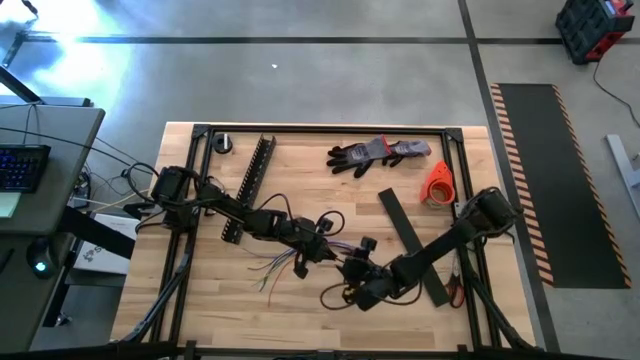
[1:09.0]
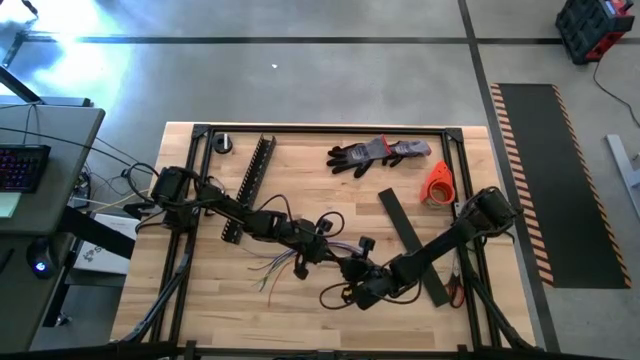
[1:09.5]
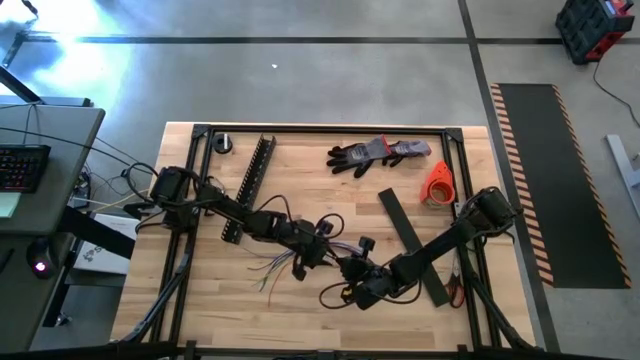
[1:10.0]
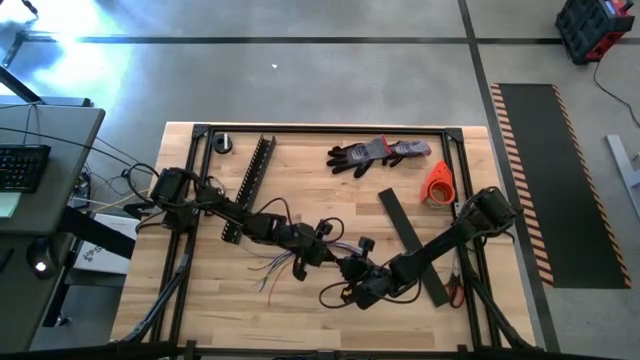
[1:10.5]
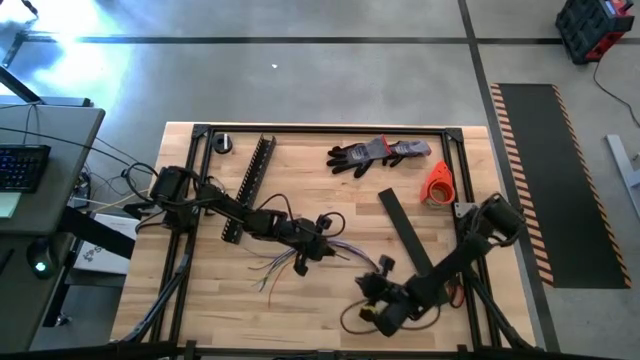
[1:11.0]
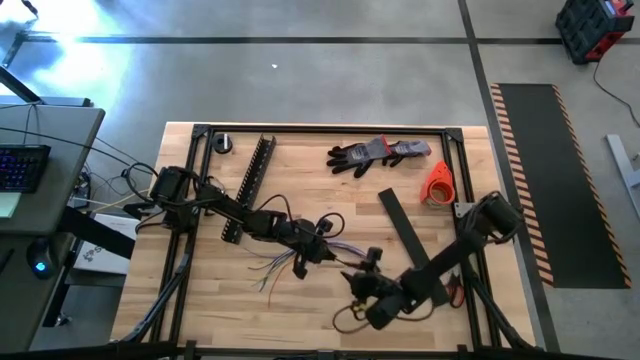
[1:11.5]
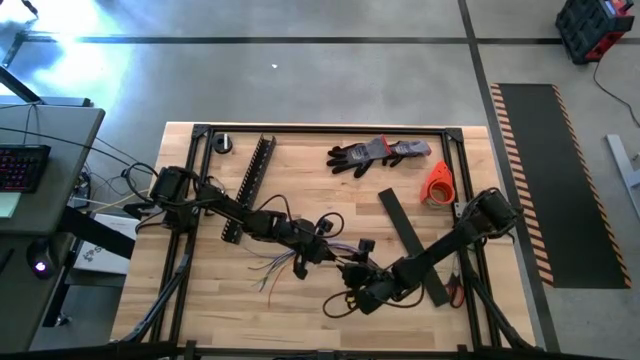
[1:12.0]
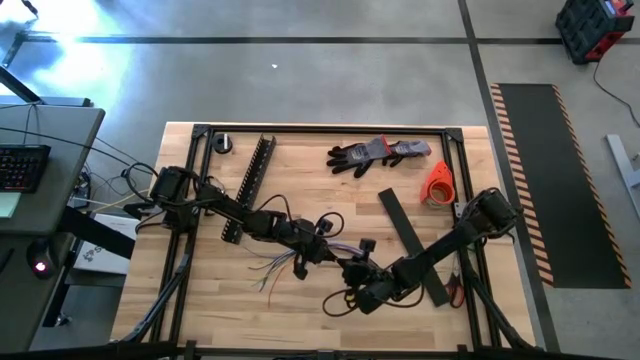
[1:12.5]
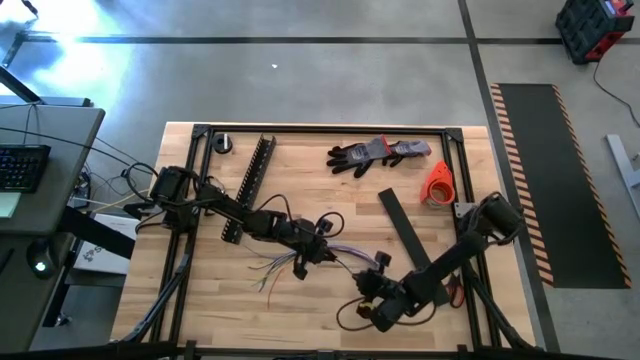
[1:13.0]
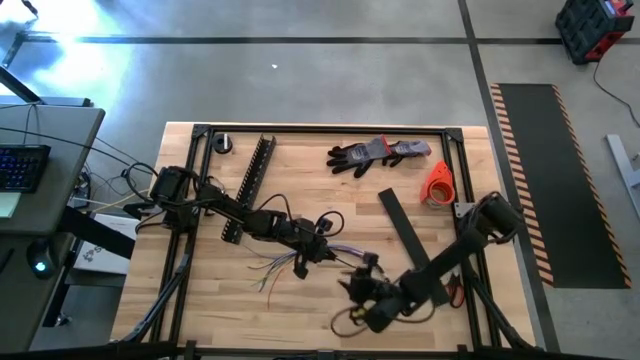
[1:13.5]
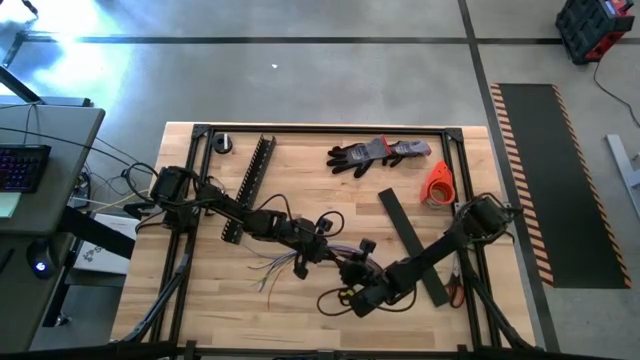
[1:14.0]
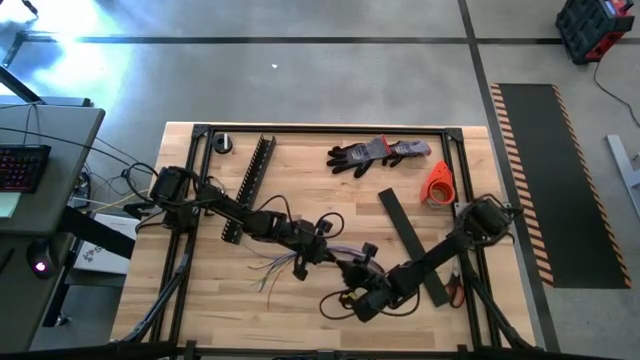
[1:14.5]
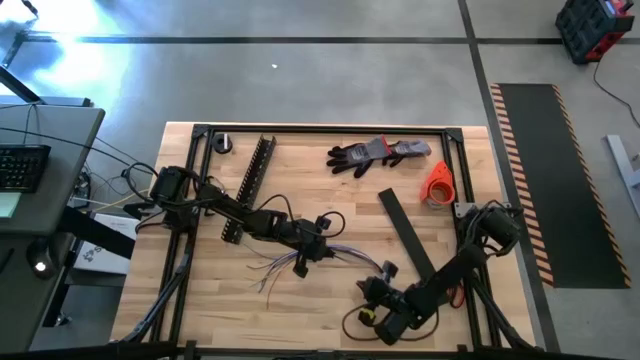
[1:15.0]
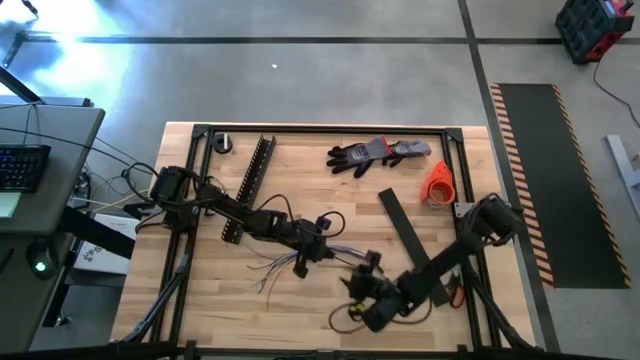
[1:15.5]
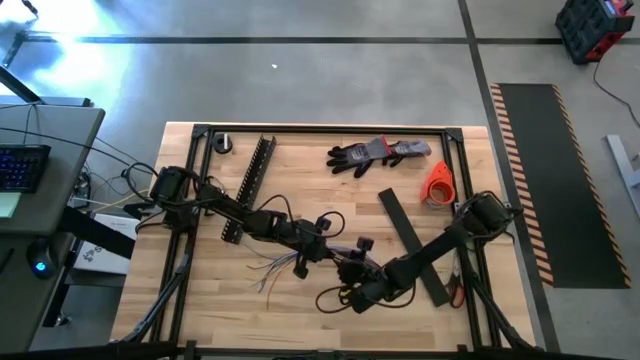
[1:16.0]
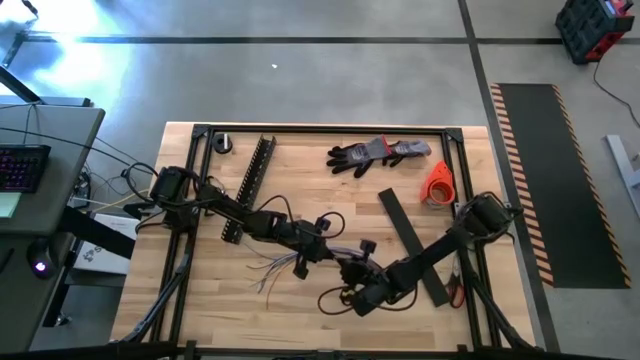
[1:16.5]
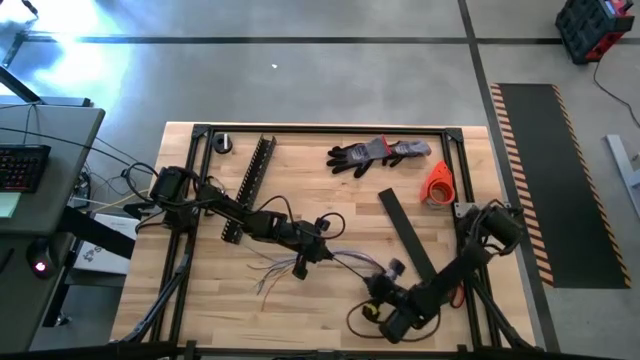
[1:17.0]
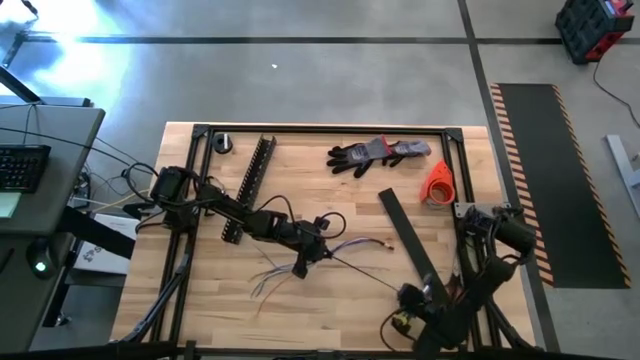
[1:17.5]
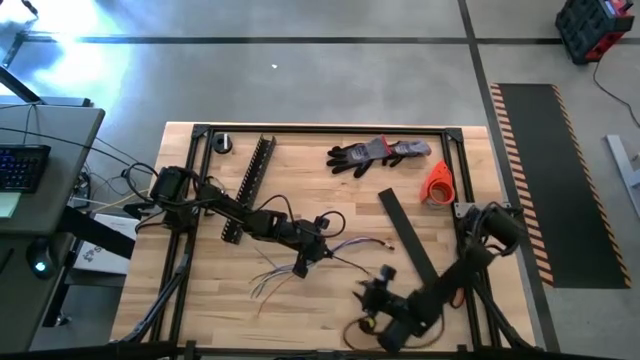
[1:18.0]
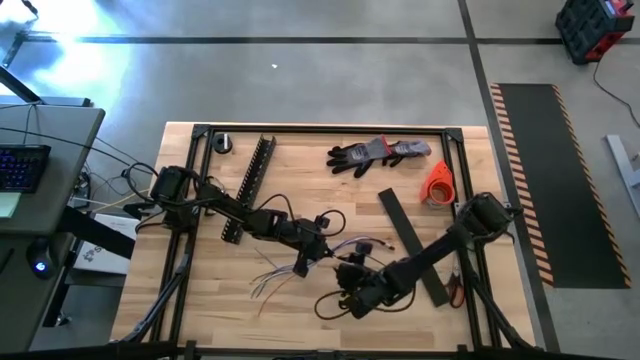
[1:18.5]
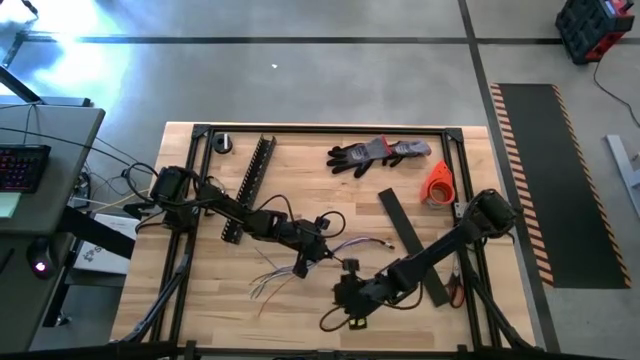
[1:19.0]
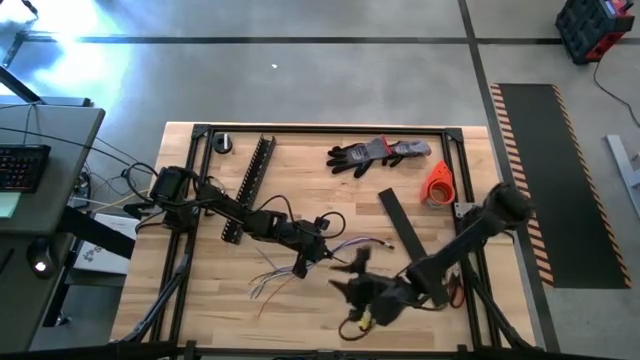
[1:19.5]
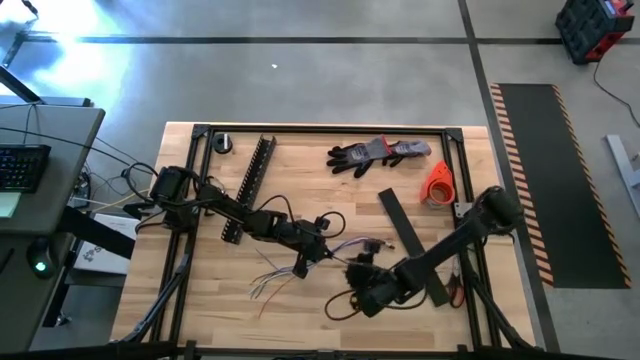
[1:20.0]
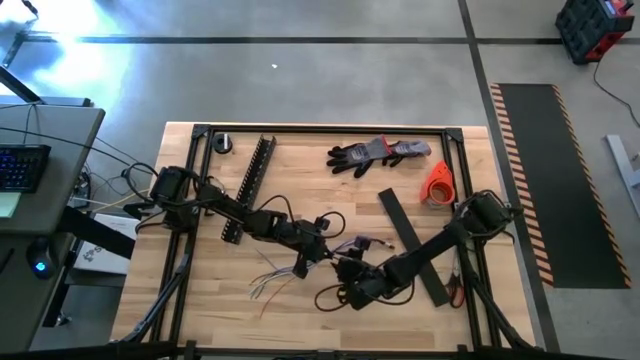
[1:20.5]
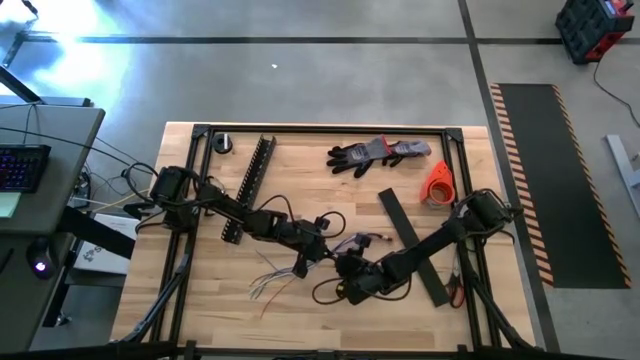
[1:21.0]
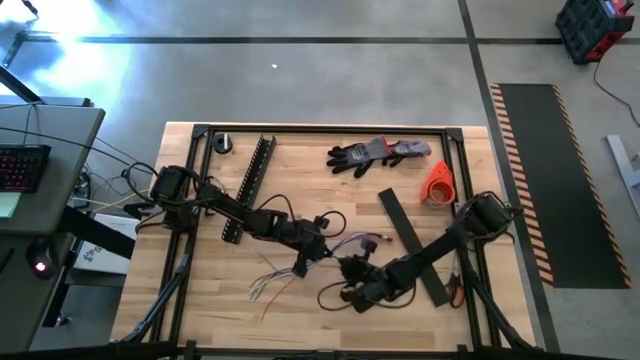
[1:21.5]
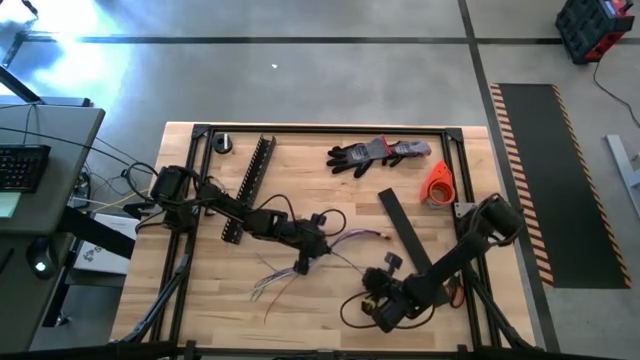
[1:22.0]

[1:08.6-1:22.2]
Task: Ziptie cables
Wrap the cables wires with the black zip tie

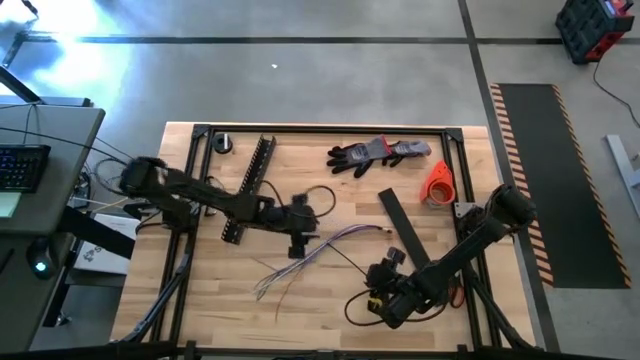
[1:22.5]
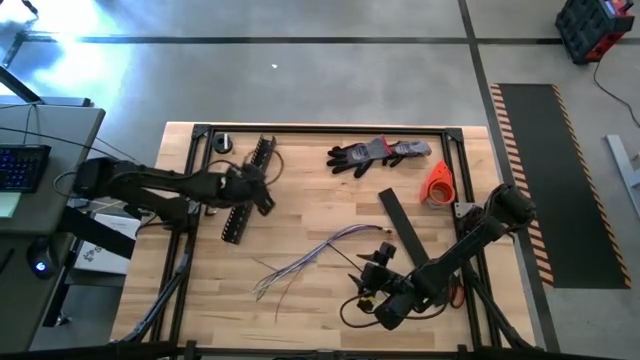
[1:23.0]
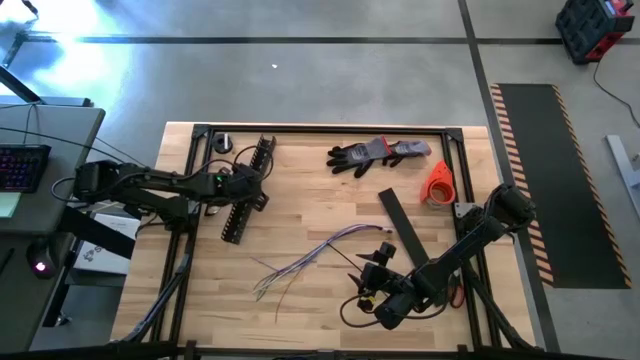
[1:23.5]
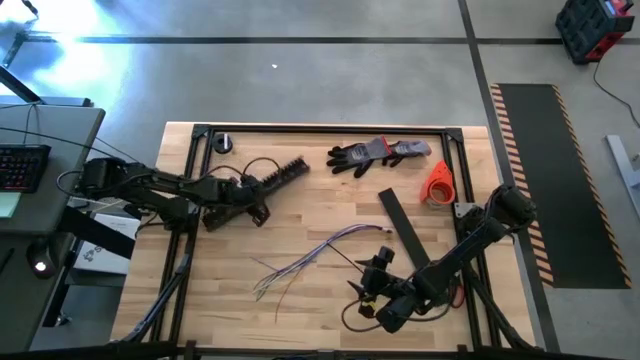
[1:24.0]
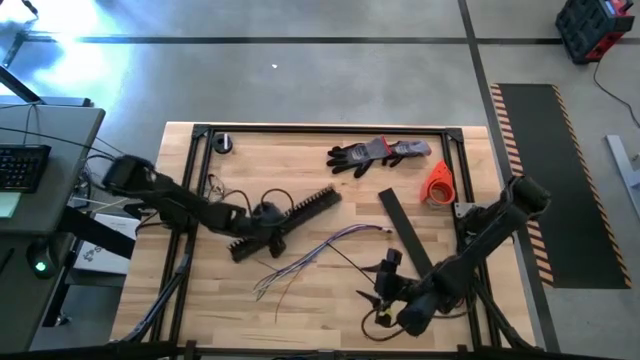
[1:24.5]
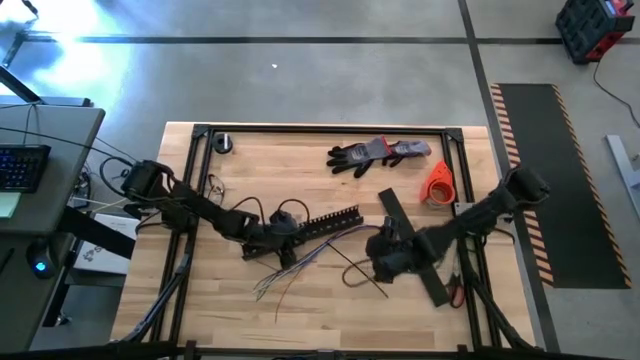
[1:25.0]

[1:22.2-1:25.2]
Move the cable duct to the center of the table

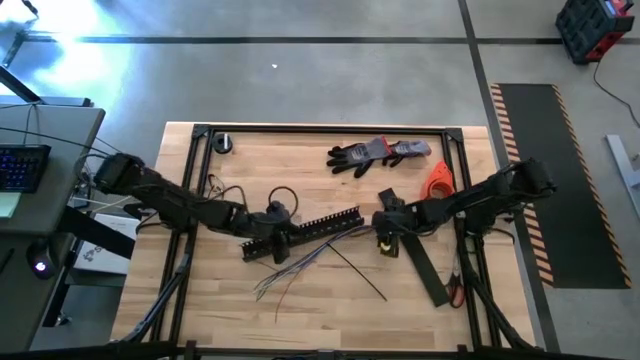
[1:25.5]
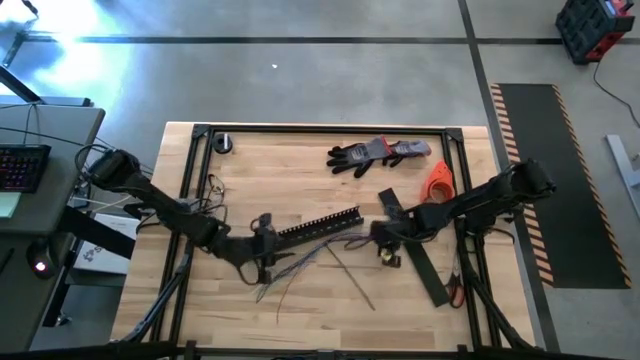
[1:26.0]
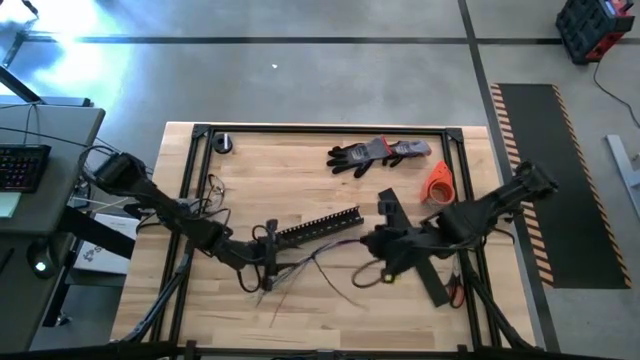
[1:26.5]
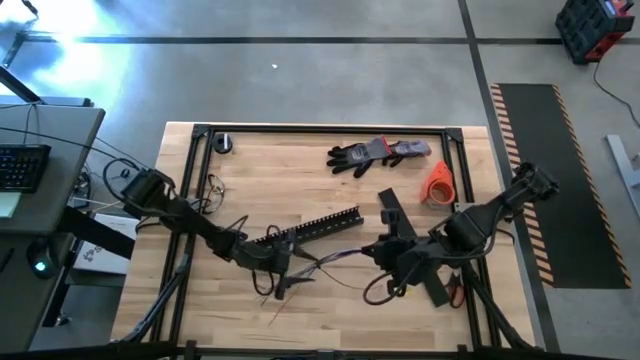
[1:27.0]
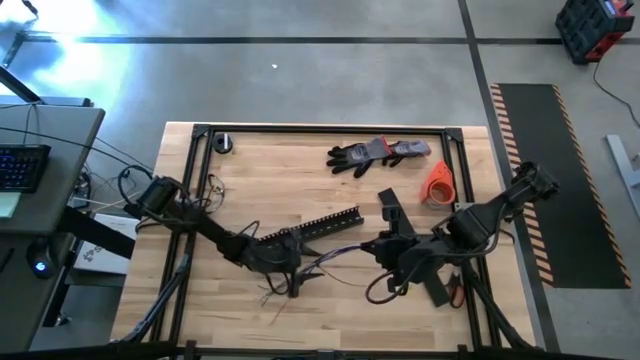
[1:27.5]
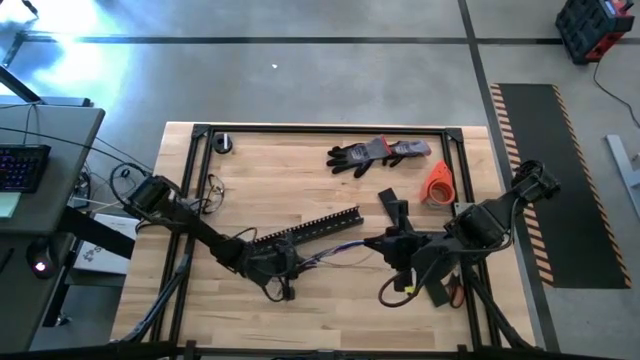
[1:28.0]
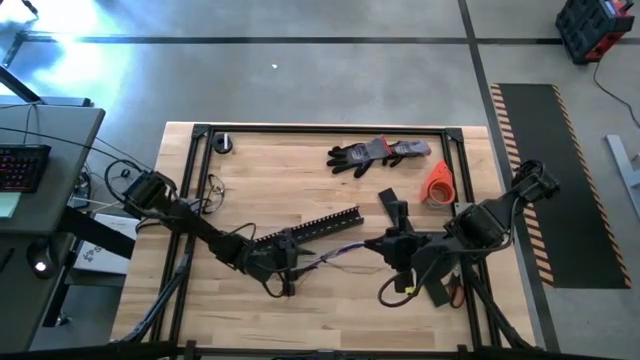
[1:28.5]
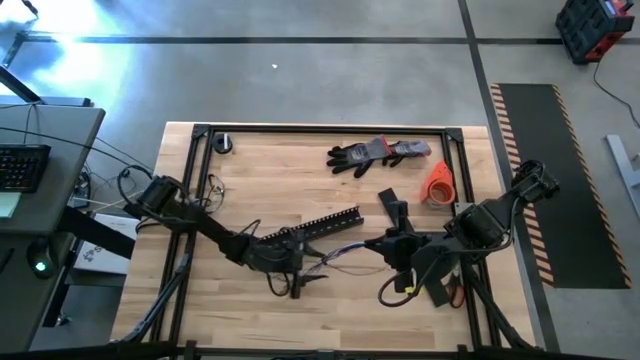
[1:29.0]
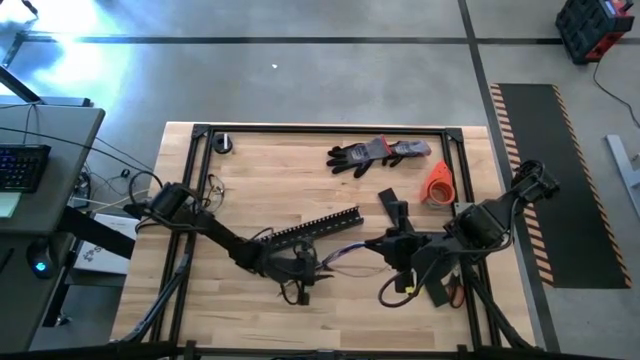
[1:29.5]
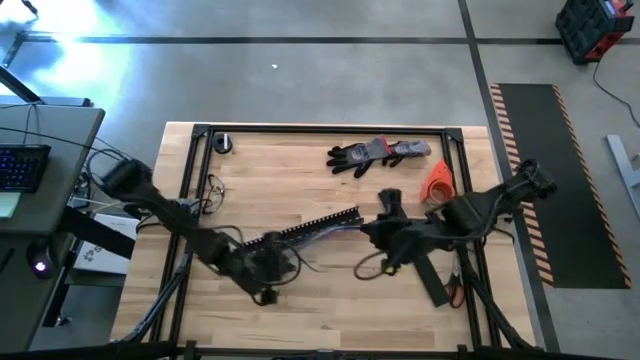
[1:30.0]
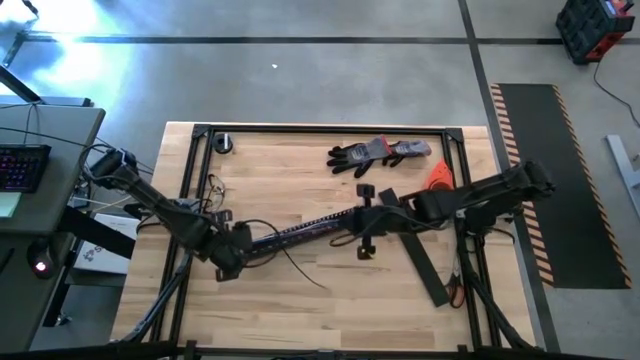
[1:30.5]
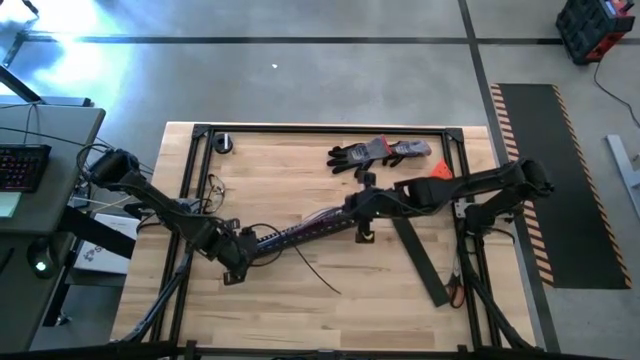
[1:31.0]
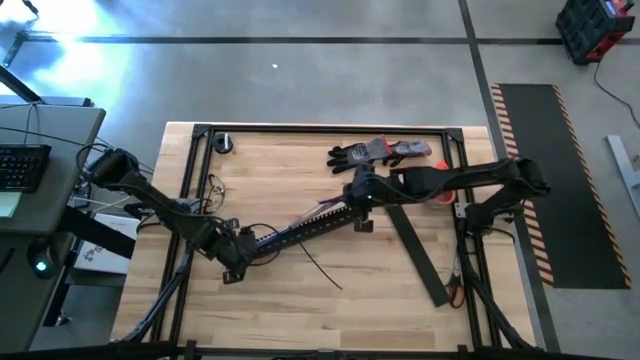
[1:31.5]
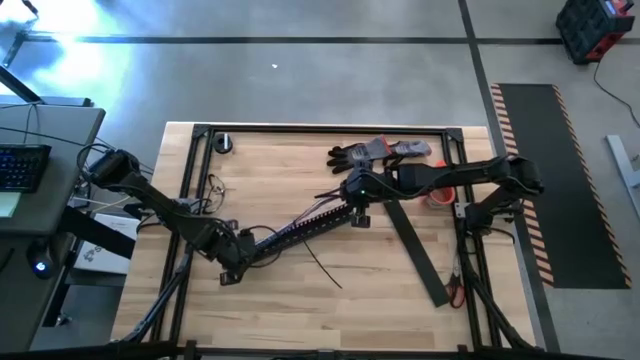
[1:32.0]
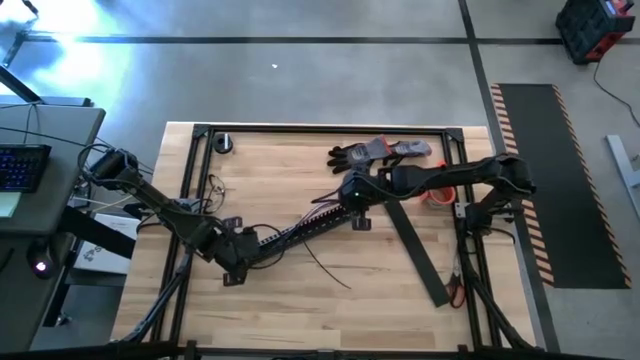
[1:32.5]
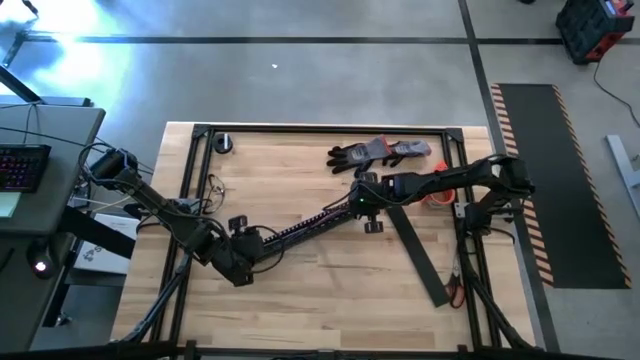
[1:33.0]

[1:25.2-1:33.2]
Put the zip tied cable wires into black cable duct
